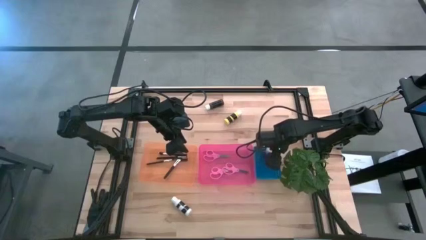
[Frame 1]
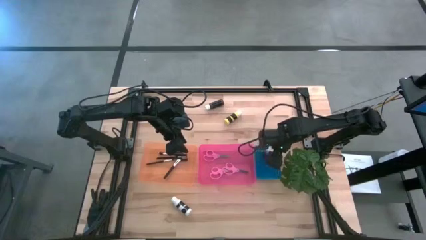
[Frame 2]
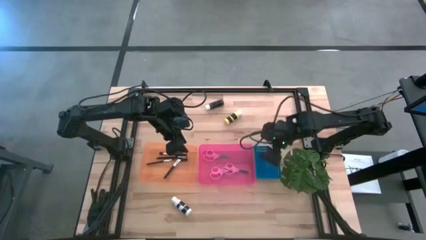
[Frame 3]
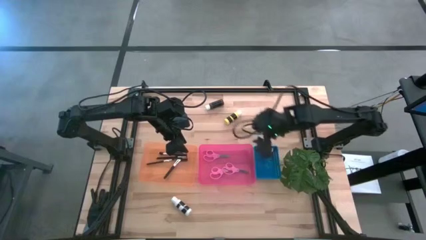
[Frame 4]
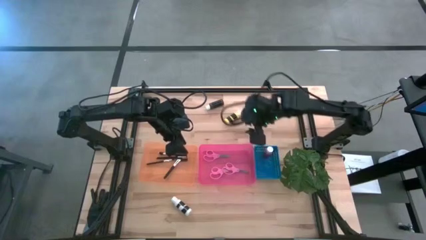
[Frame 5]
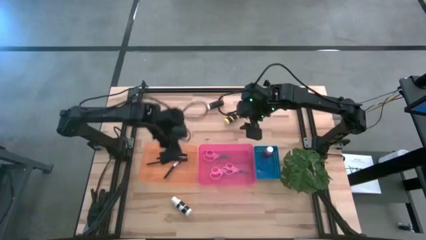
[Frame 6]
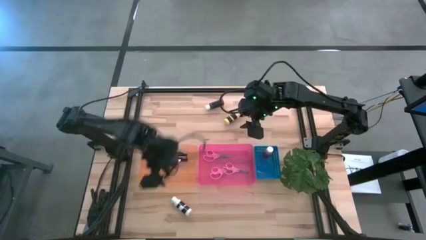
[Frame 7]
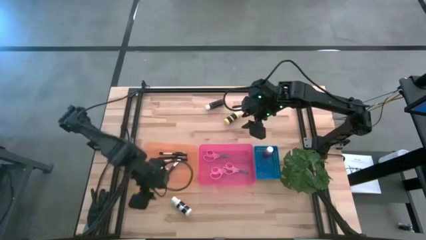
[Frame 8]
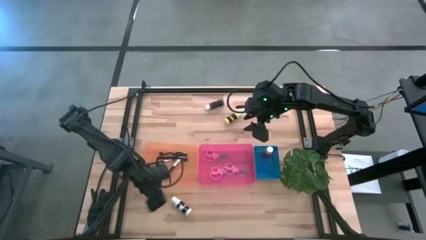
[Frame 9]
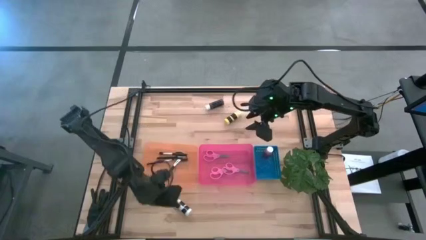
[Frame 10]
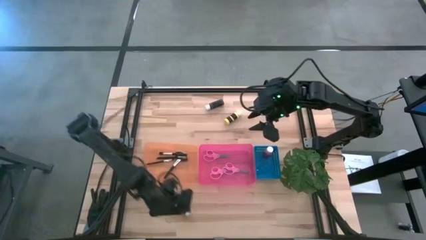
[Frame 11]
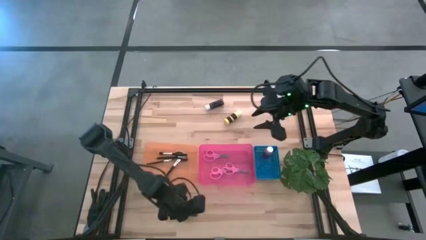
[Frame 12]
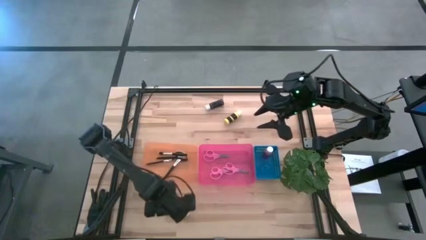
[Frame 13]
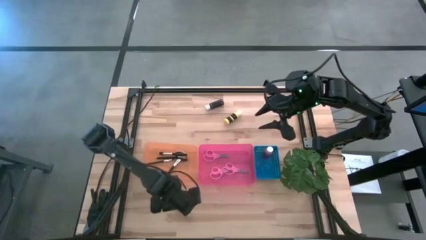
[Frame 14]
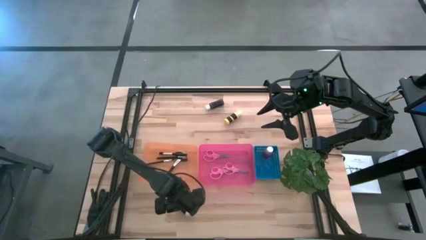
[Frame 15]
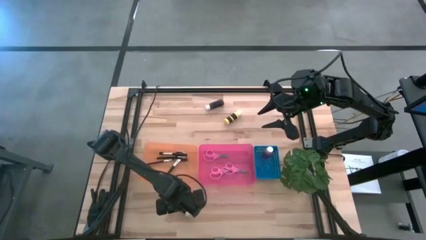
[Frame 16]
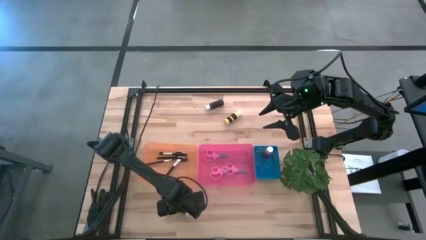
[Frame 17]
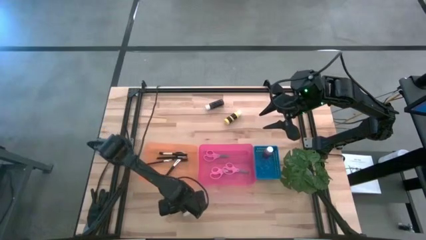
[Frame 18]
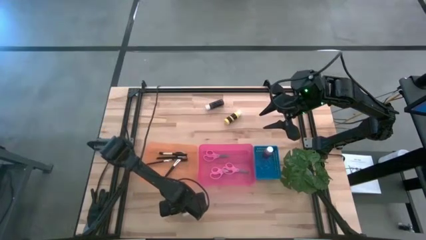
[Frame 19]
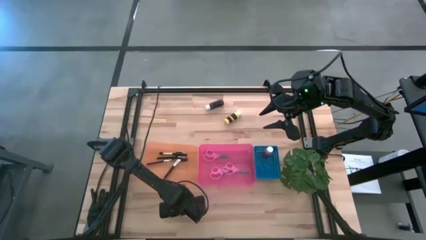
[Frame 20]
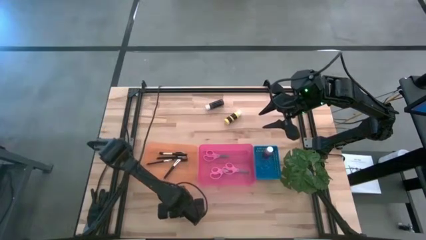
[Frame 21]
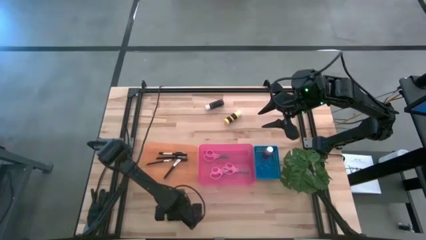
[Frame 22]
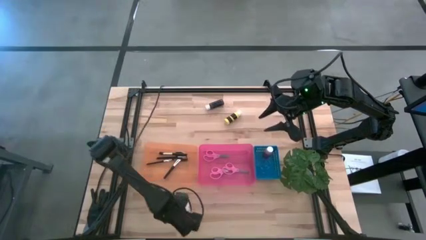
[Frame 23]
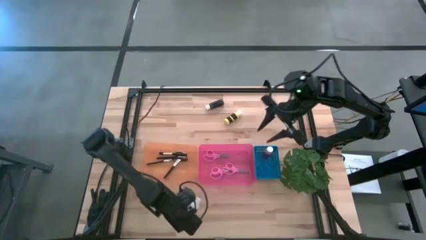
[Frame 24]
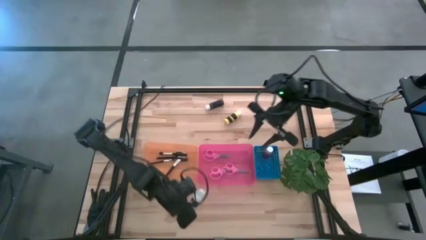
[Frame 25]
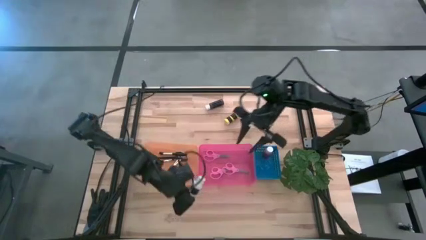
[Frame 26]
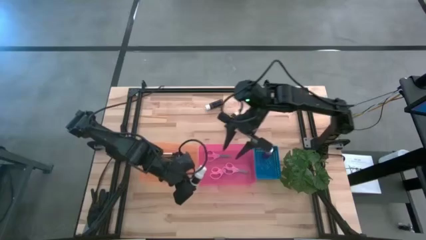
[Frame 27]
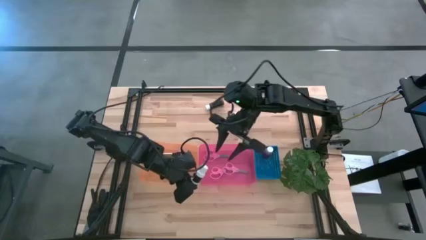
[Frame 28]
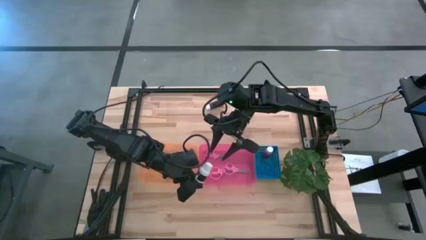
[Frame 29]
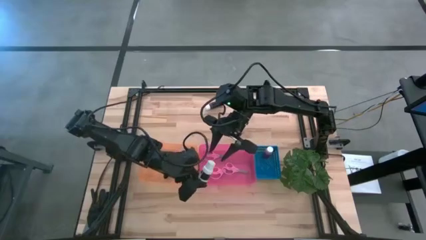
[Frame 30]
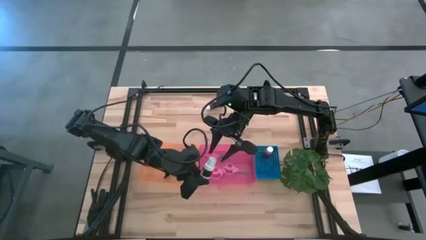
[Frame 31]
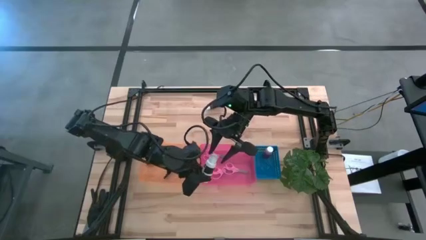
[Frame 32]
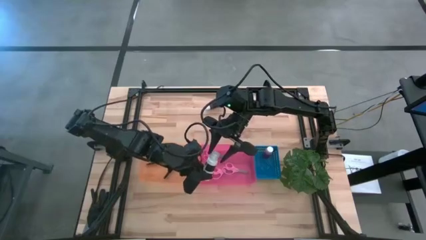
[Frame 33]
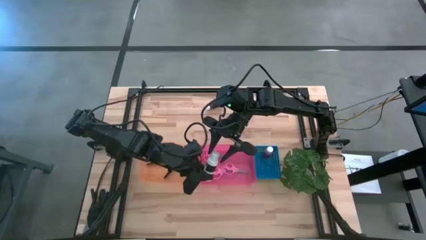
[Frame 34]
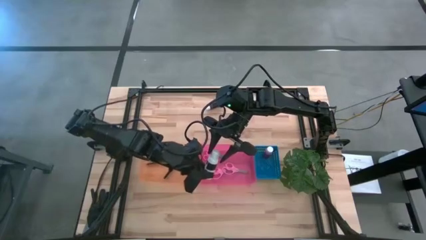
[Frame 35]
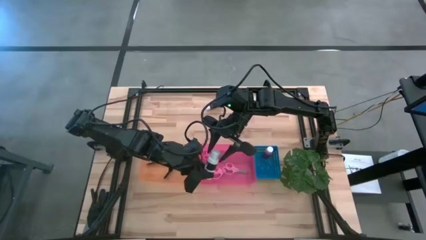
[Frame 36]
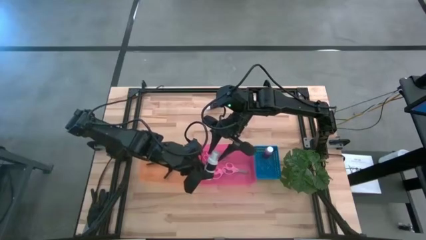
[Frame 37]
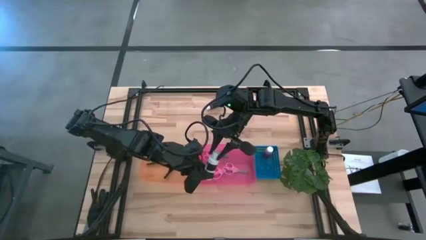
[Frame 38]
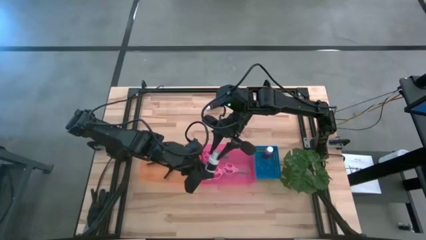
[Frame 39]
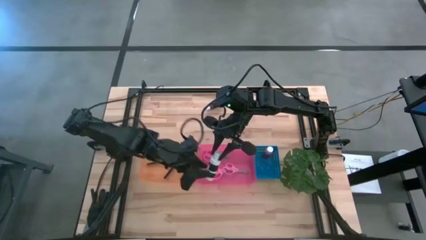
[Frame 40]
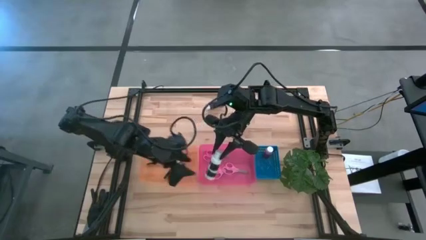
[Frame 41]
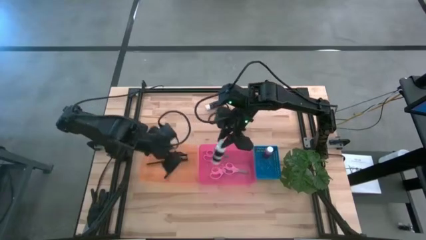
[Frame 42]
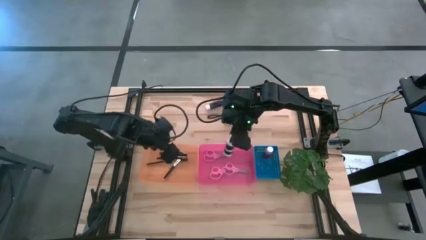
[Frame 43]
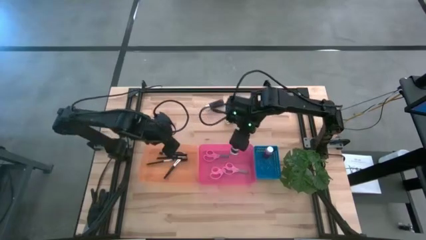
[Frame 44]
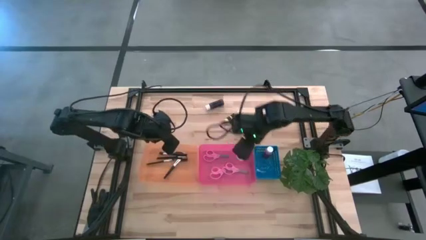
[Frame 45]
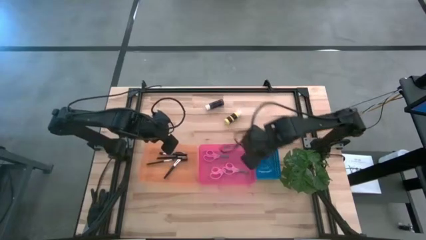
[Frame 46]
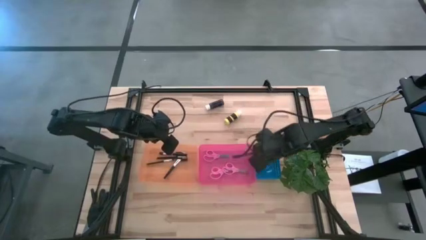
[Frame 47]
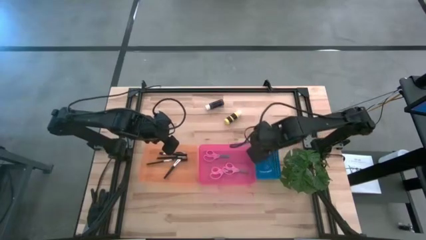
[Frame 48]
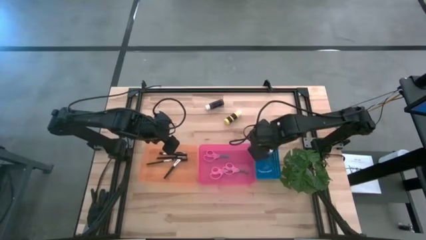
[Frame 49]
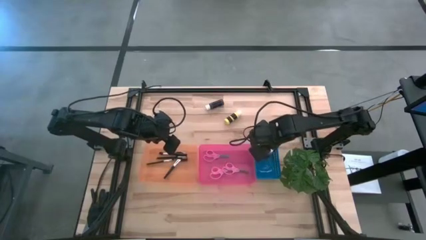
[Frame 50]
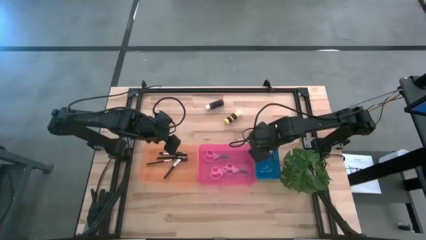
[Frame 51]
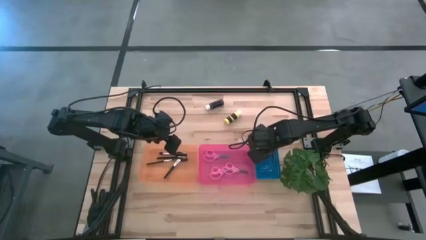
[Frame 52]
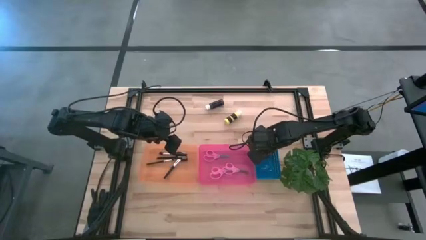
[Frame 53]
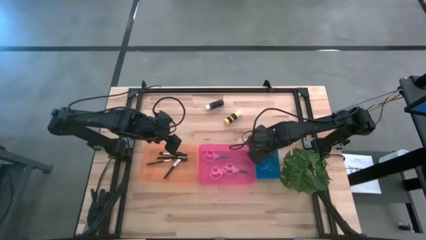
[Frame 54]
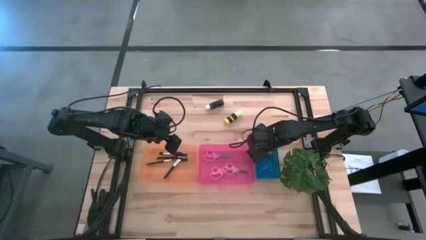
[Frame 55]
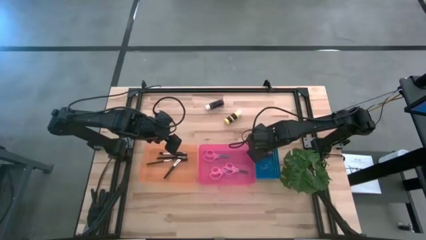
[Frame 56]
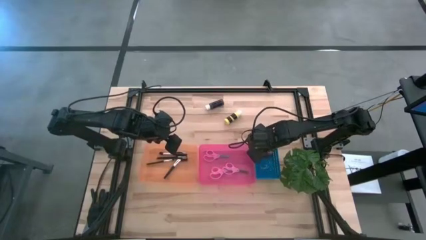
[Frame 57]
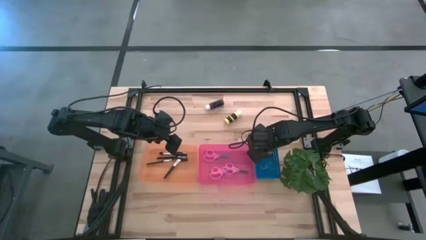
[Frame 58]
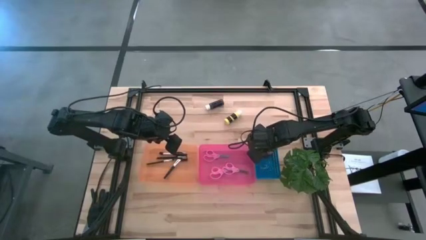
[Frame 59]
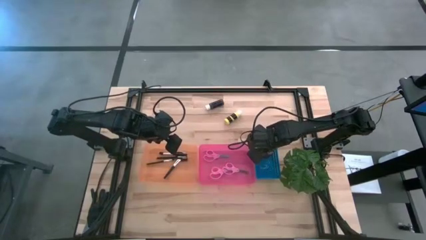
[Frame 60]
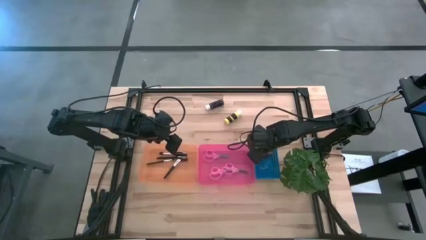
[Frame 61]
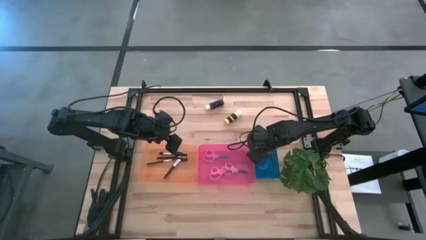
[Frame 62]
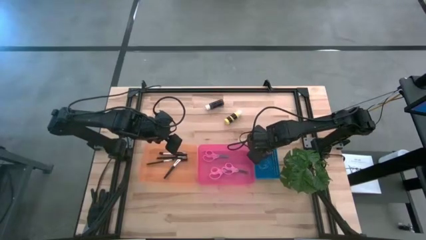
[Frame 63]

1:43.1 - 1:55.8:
Task: Pick & Place Paint Supplies
Put the white paint bottle into the blue bin
